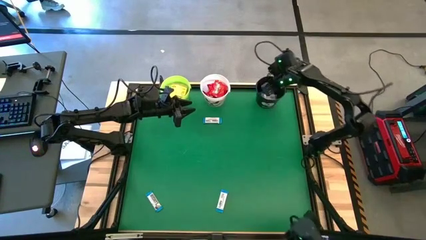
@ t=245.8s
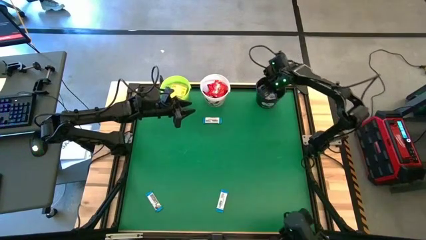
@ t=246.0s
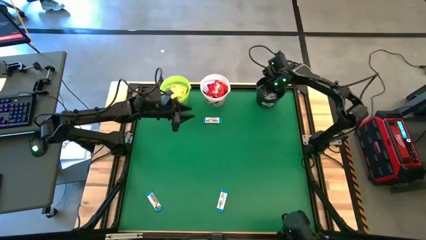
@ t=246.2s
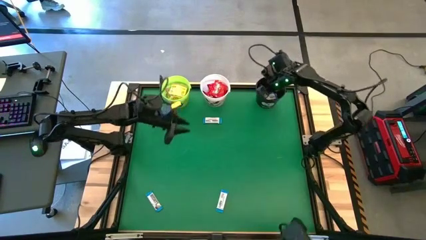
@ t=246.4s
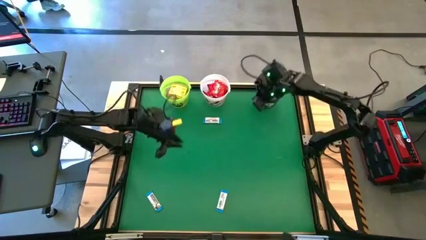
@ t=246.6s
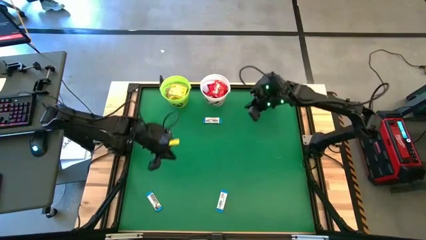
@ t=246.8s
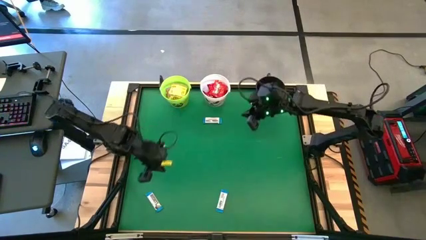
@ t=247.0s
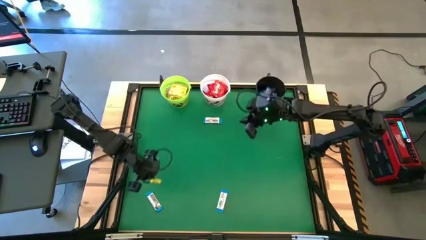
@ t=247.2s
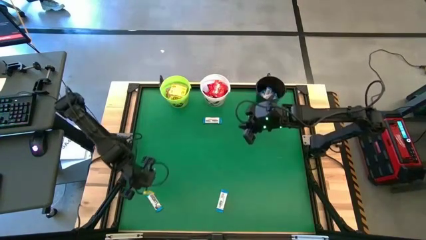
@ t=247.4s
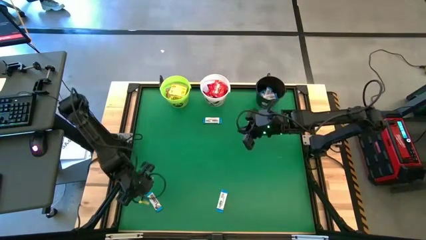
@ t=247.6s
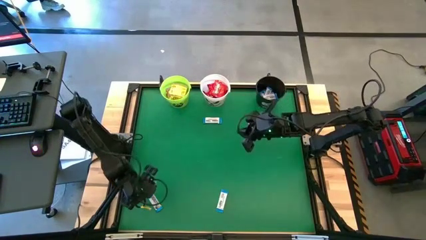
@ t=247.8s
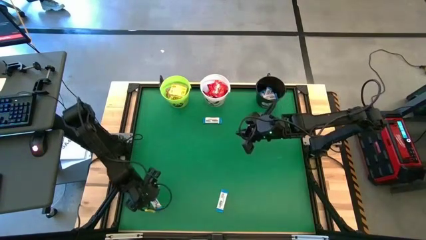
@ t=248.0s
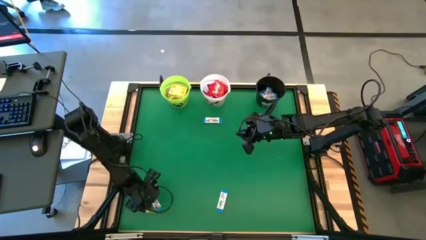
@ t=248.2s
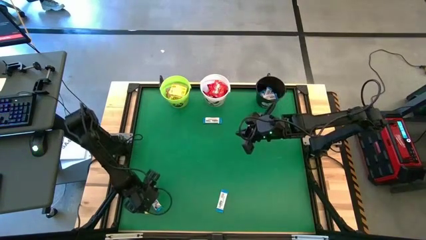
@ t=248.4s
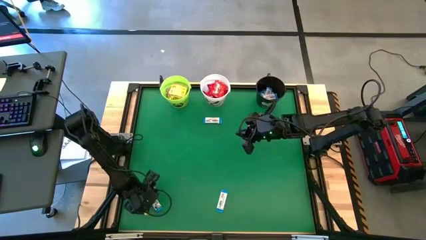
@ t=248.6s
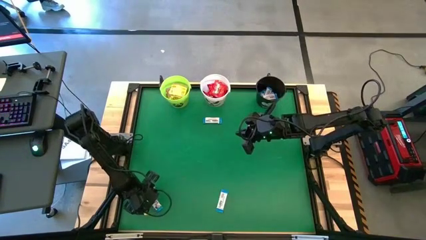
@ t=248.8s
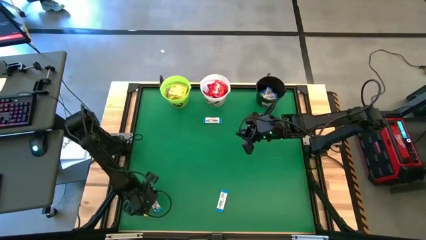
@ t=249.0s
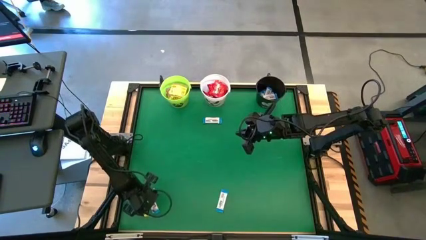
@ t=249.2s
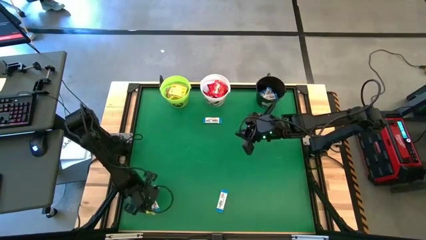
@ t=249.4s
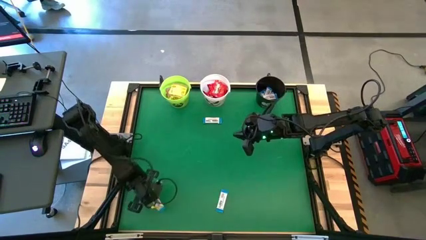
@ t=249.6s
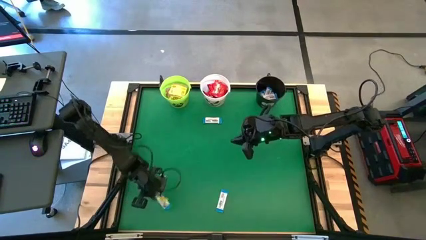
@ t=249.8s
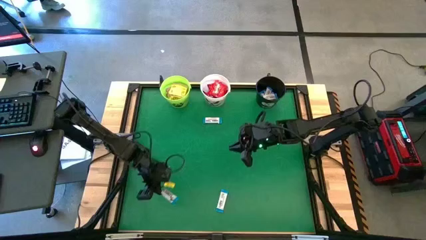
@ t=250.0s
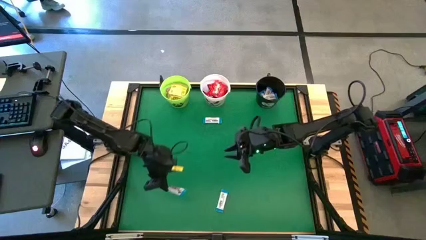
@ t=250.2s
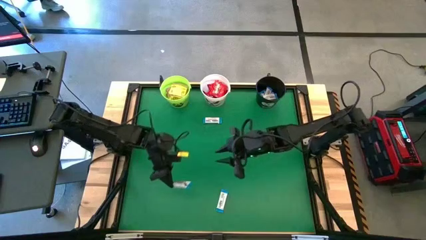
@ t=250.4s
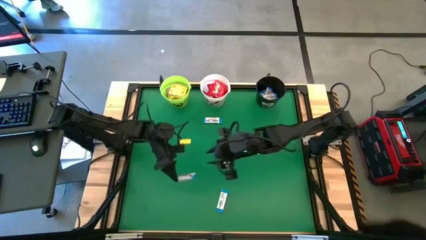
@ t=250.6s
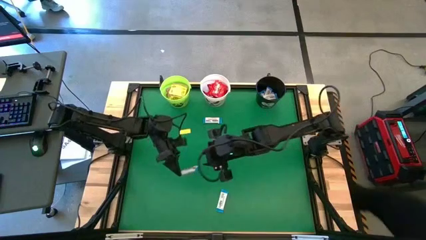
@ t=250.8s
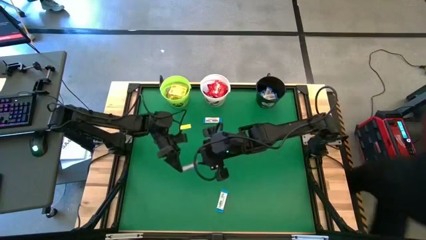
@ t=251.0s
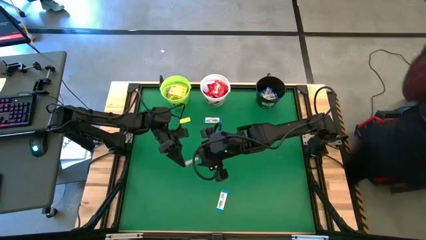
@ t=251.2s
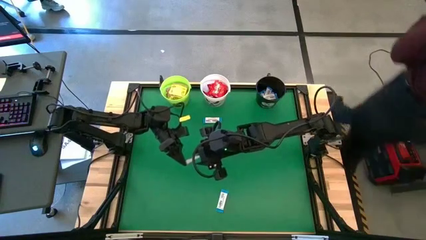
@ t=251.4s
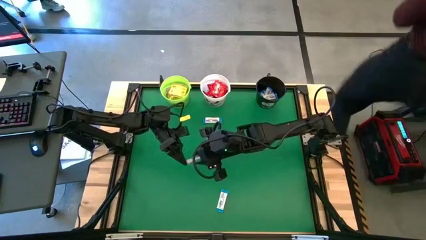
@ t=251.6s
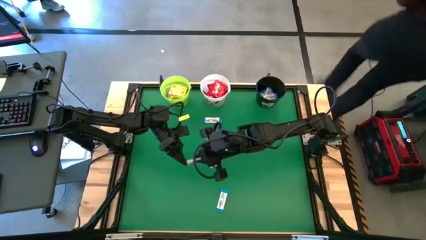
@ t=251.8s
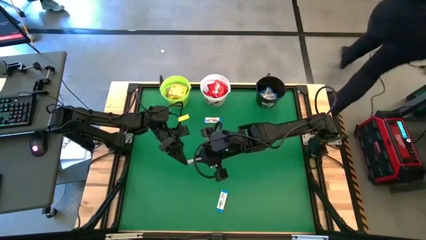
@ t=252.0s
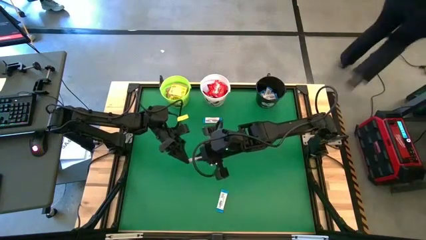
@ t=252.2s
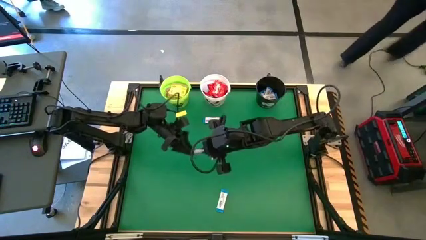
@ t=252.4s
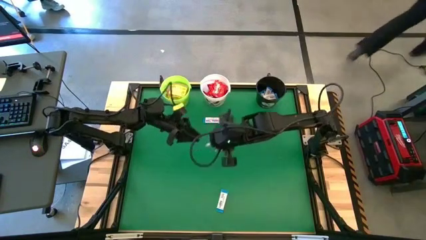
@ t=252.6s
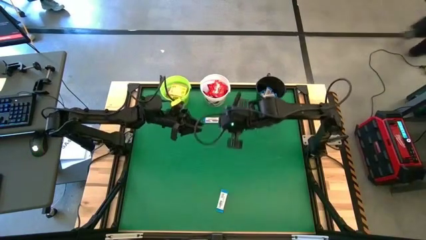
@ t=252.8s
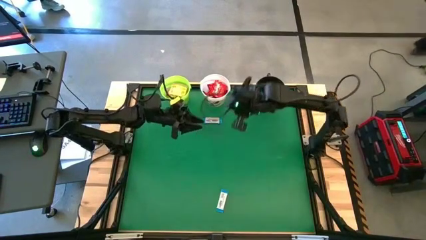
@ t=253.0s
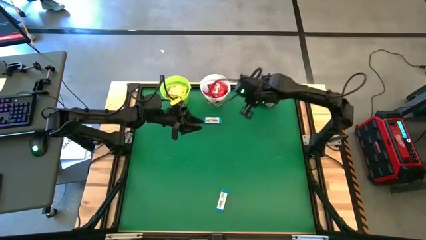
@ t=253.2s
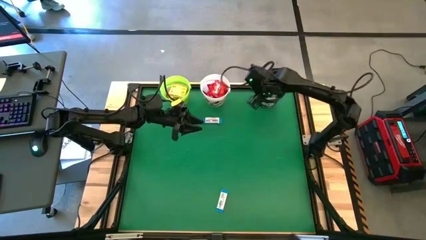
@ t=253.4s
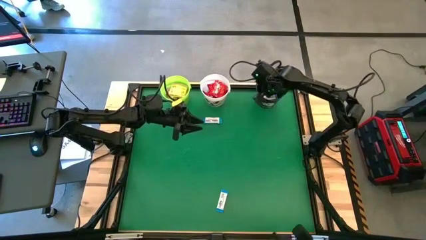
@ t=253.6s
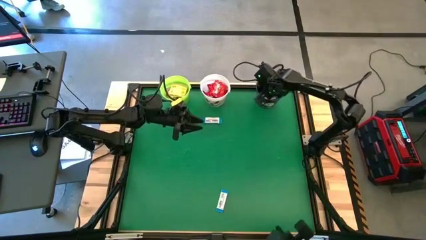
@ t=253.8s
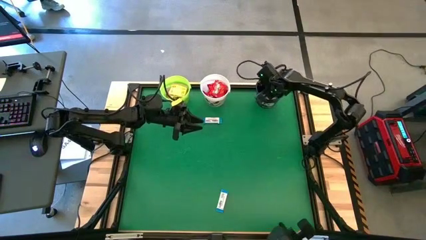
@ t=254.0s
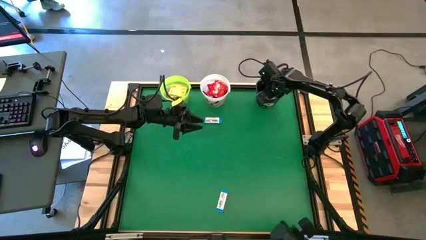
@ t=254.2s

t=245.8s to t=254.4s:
Task: Sort candy by brand, put in halloween buckets
Put the white chocolate bar into the black bucket

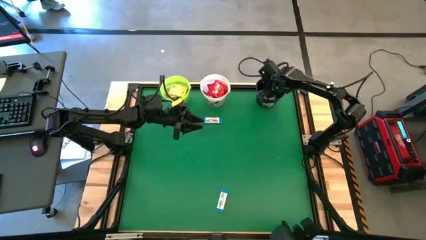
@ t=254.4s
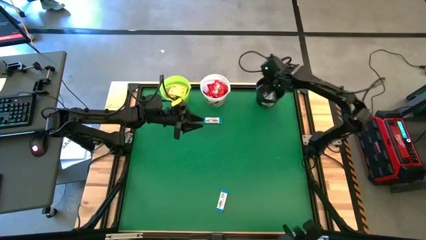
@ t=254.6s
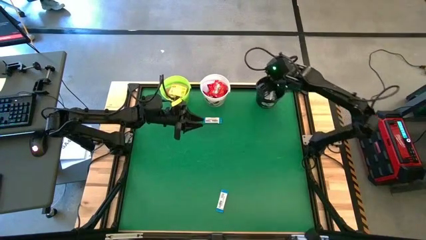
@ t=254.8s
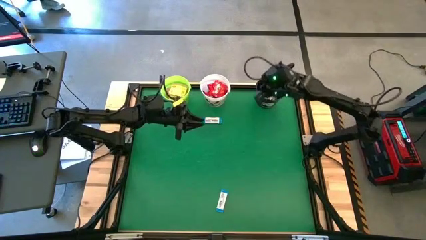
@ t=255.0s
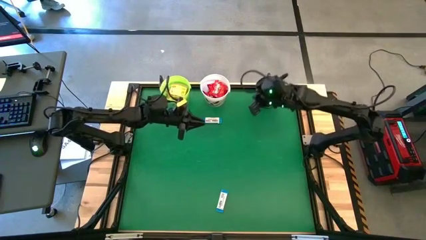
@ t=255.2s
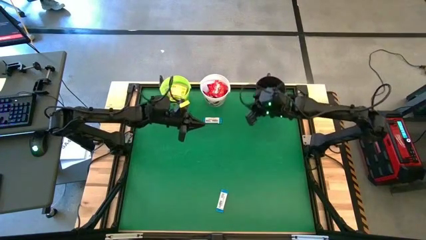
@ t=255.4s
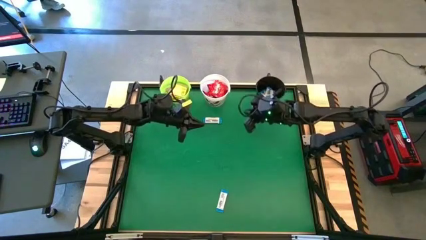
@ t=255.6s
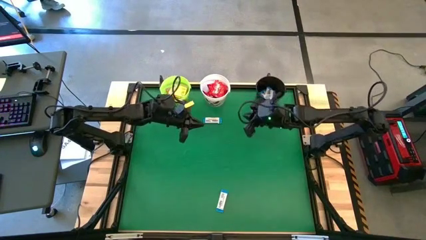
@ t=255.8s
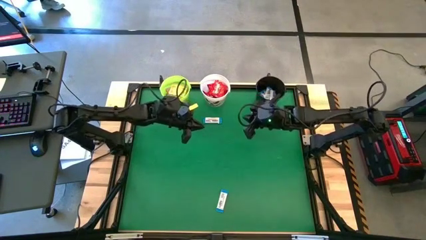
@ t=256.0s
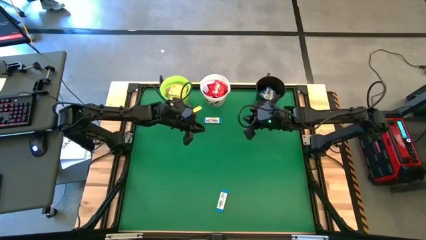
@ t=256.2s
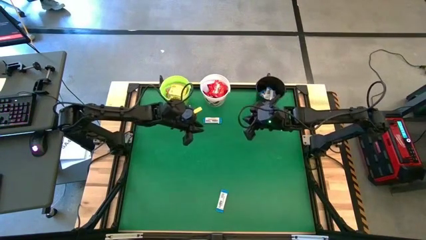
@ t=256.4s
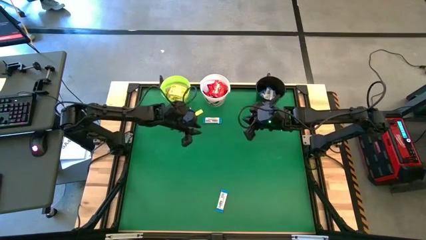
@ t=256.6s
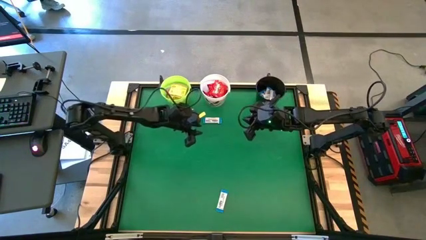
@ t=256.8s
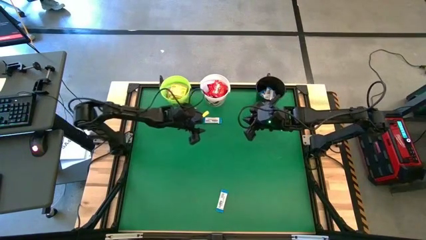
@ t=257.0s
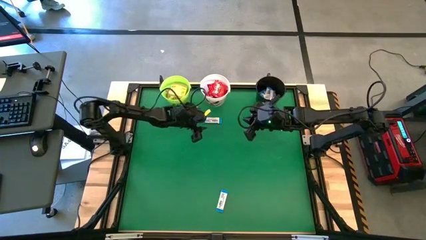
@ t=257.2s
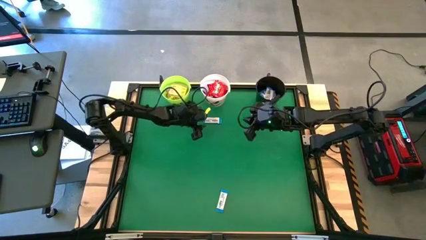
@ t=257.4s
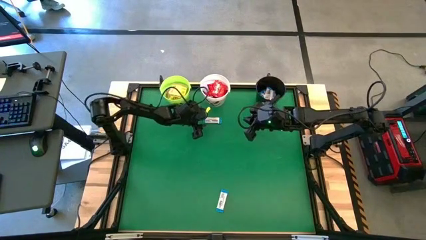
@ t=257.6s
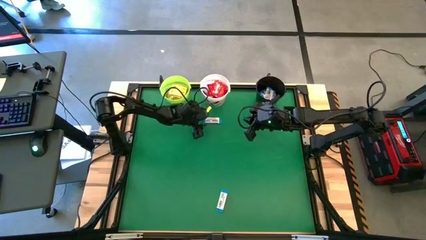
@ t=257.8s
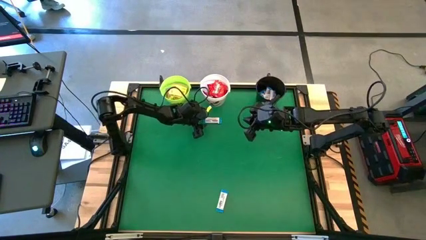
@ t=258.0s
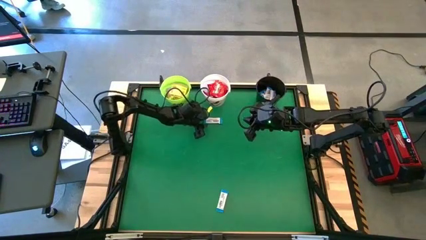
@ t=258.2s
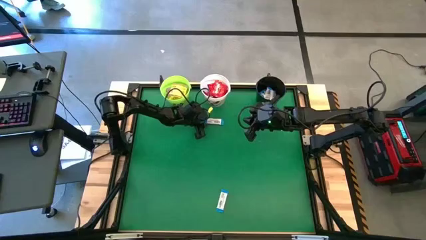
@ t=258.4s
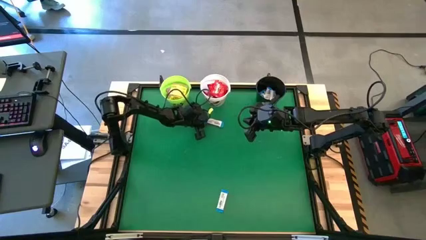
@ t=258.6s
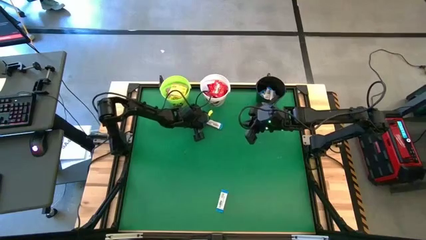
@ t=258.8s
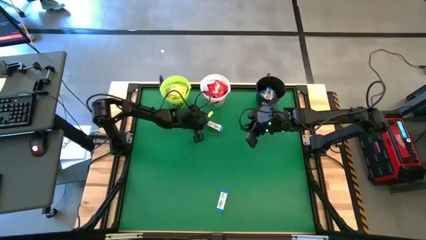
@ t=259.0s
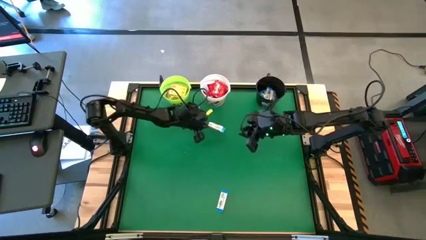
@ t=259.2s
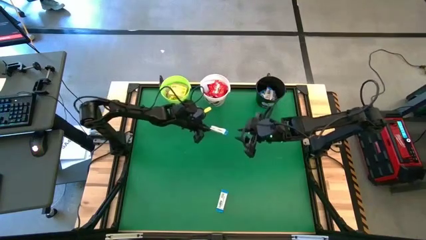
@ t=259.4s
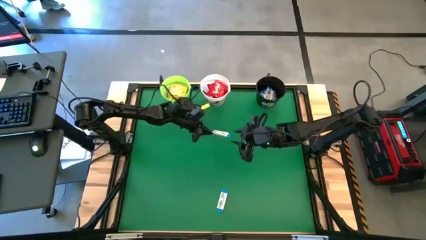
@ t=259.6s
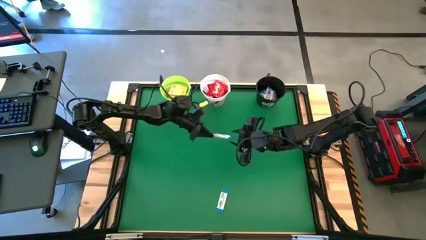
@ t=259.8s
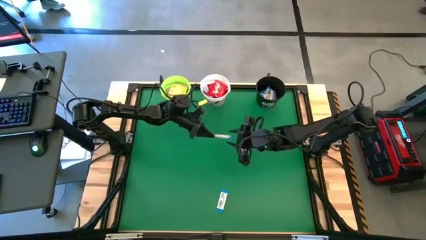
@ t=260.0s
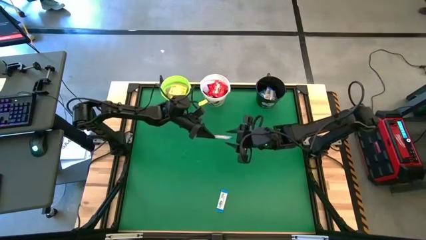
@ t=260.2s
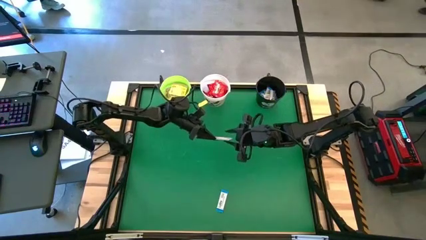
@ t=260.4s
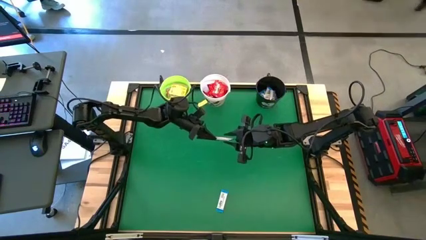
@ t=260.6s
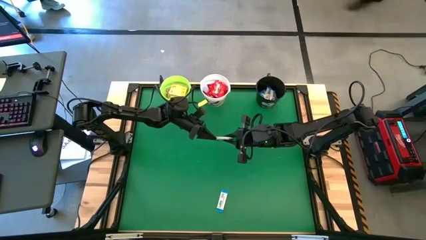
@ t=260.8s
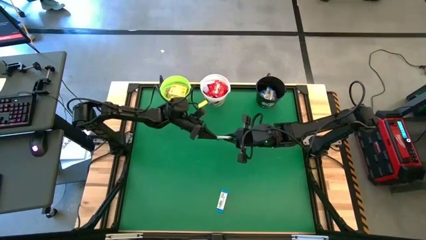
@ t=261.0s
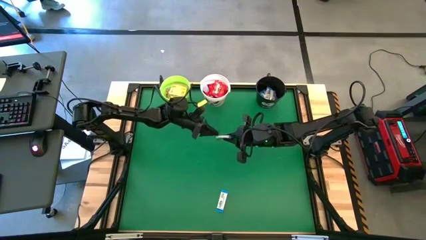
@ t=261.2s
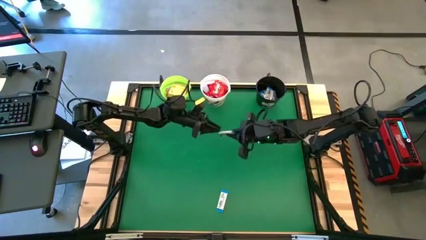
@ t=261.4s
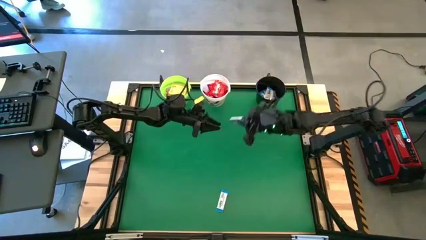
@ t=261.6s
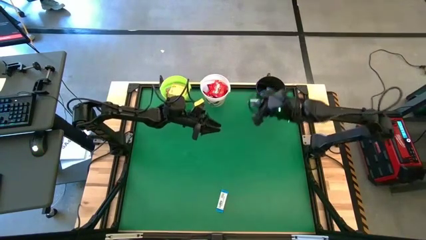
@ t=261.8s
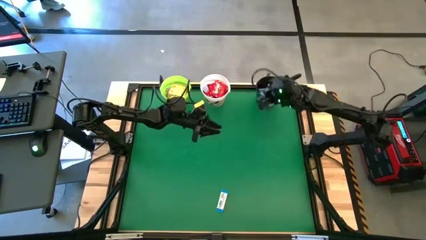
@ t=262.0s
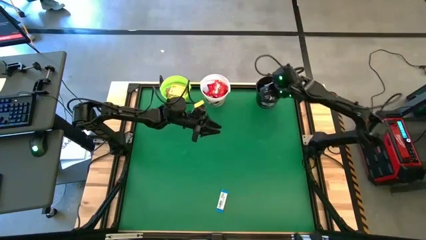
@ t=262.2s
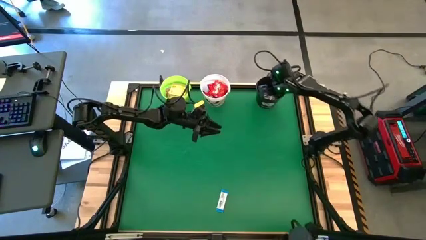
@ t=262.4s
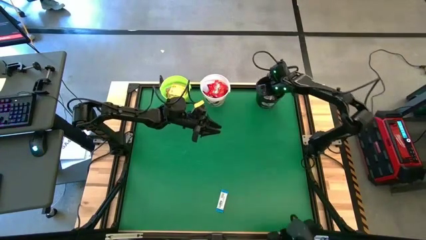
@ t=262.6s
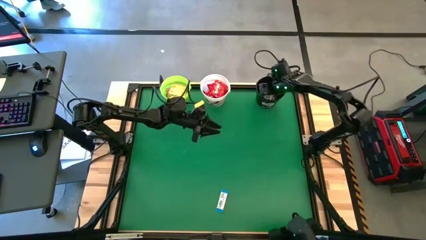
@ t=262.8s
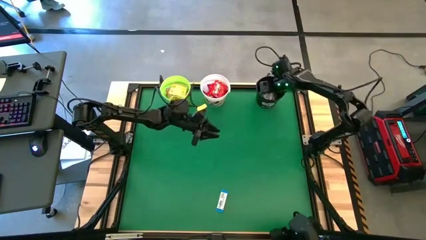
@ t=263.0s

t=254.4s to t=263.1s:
Put the white chocolate bar into the black bucket
